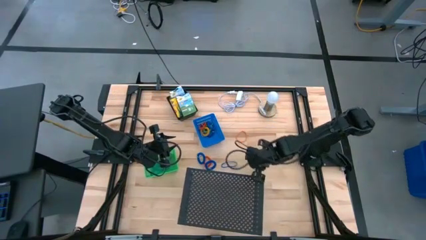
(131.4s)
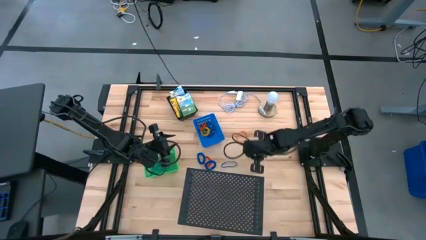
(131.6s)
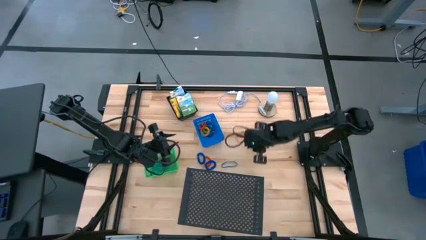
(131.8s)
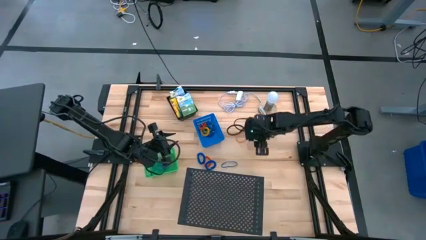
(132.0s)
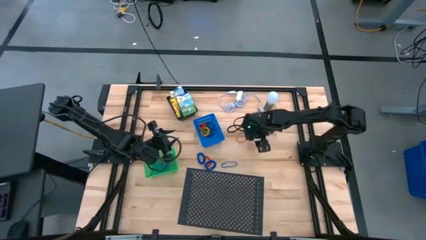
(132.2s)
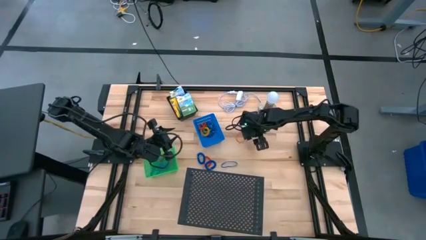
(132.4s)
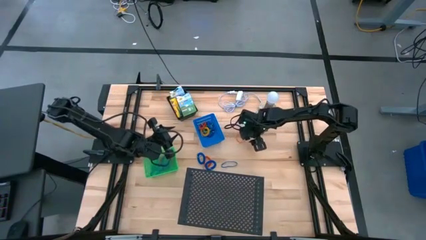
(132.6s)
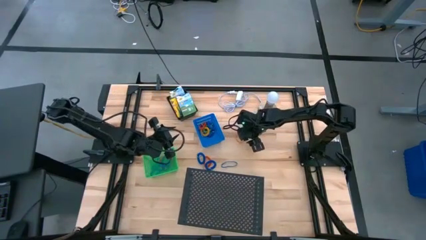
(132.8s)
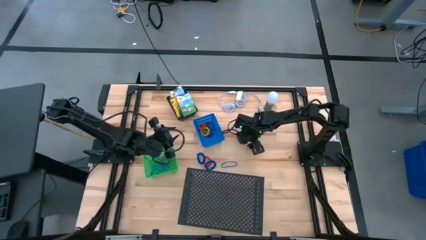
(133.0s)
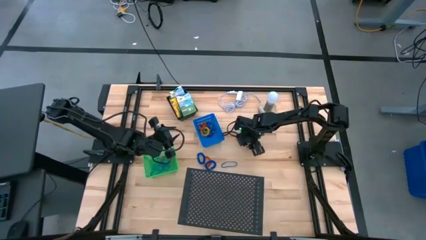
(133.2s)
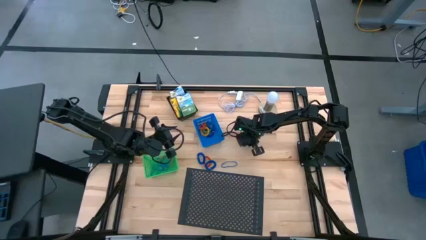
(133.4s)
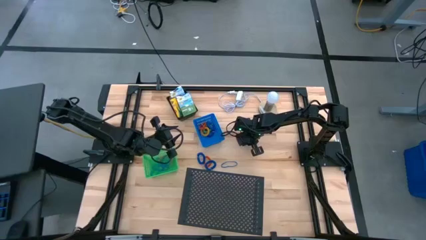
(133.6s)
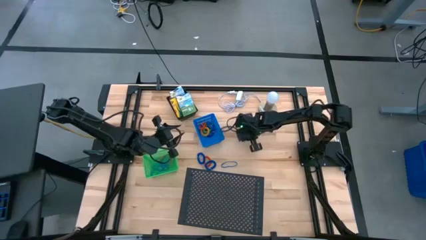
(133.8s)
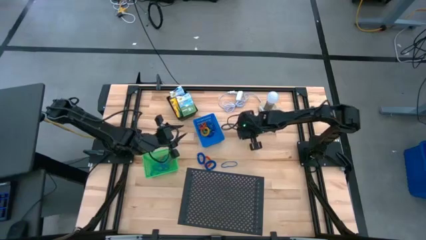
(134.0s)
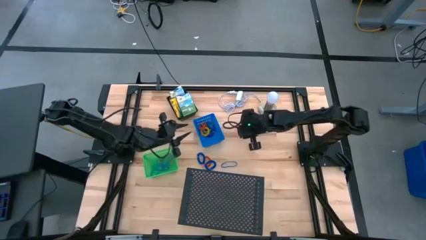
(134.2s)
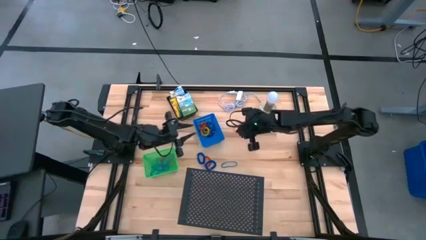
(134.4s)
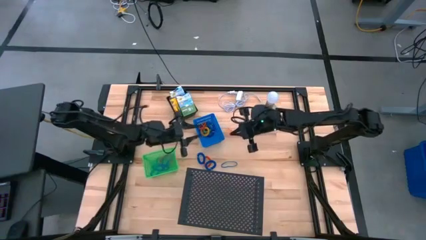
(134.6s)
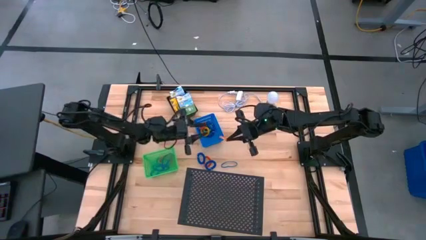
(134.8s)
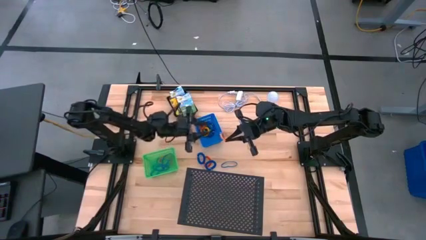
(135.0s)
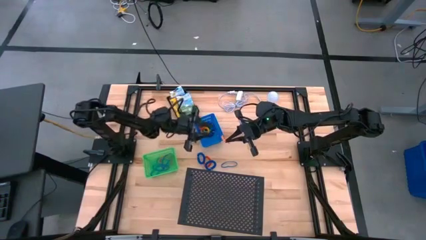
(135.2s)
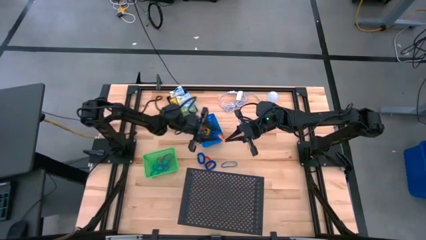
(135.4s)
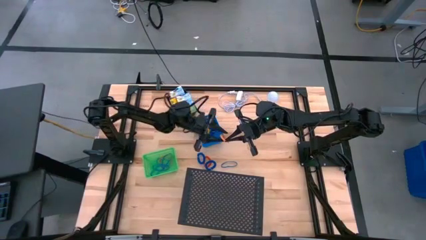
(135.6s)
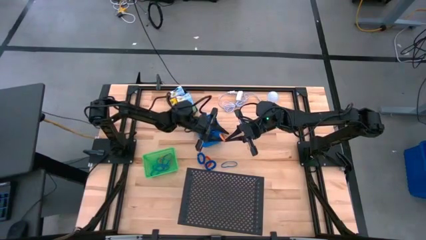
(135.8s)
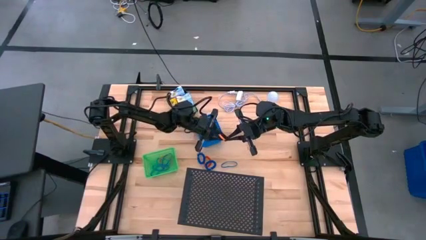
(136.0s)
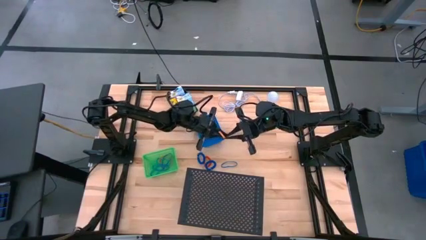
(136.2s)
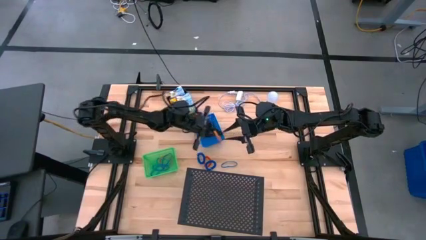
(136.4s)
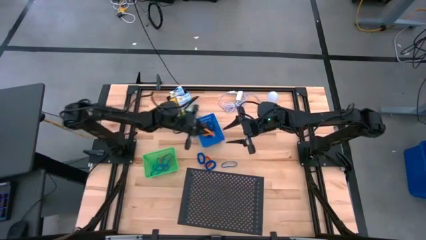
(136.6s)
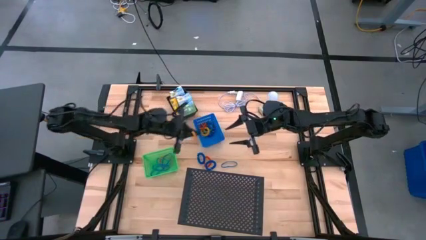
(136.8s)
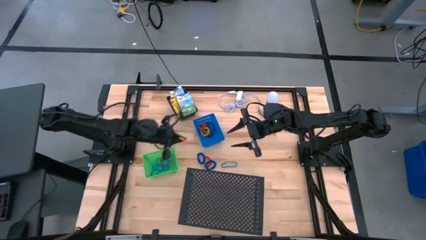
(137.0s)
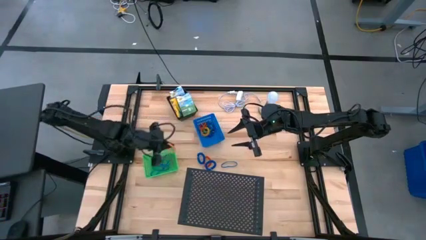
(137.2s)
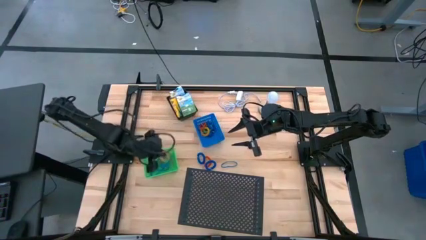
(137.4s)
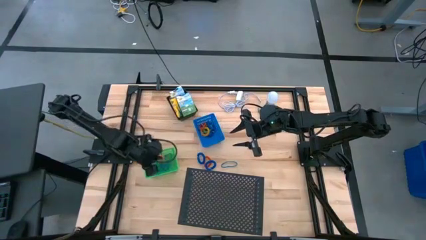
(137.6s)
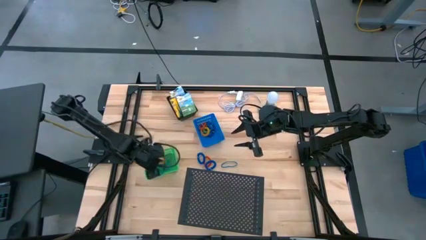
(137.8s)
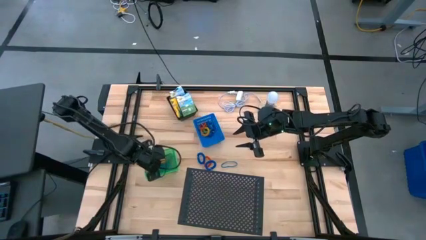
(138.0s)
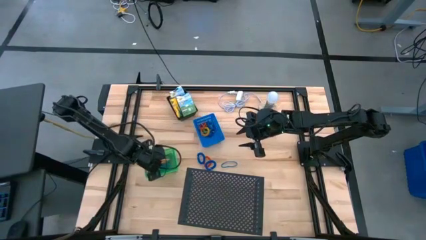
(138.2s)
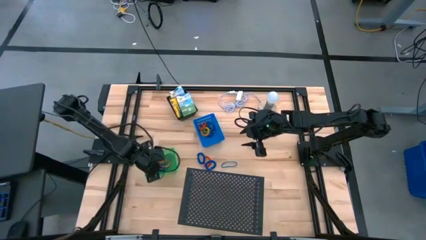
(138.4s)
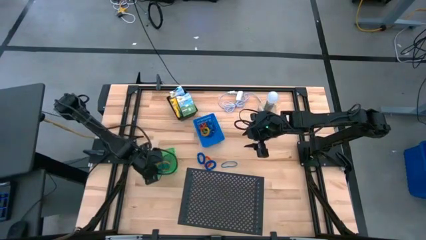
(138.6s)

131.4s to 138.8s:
Task: Pick & Place Office Desk Supplies
Put the yellow rubber band into the green bin

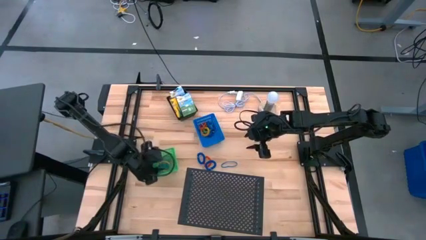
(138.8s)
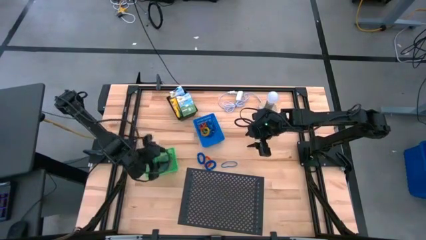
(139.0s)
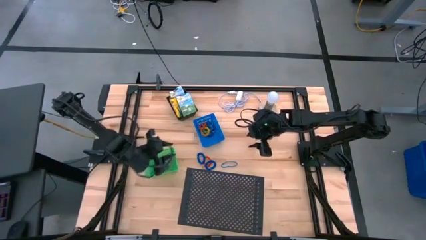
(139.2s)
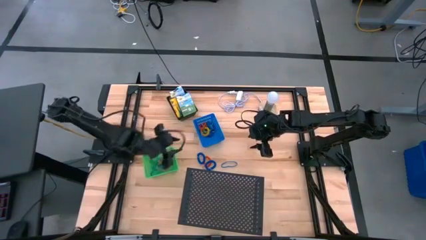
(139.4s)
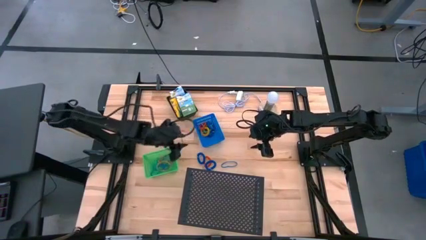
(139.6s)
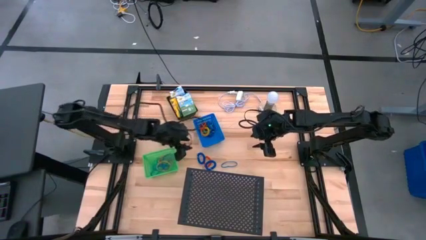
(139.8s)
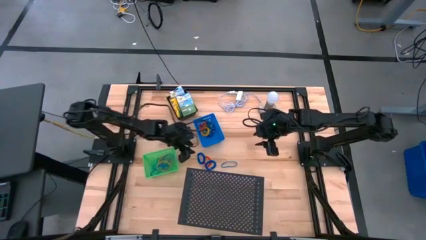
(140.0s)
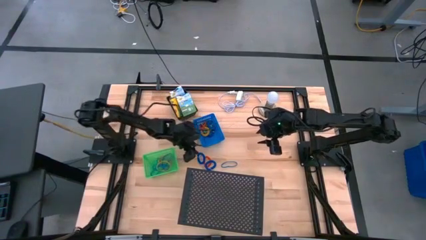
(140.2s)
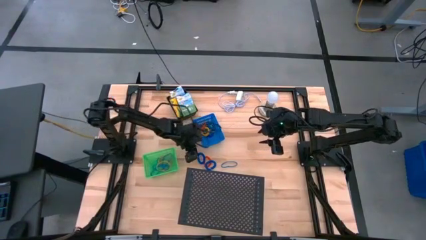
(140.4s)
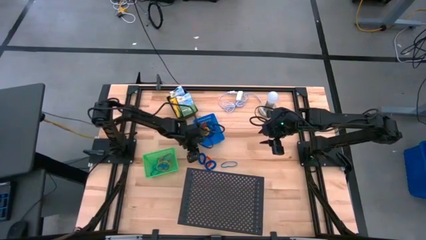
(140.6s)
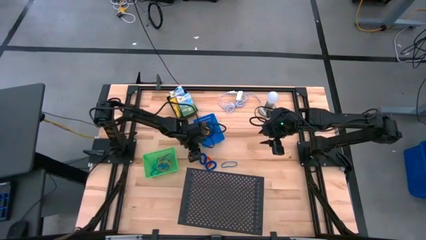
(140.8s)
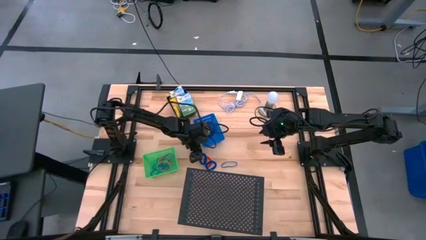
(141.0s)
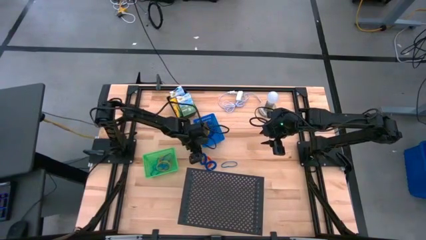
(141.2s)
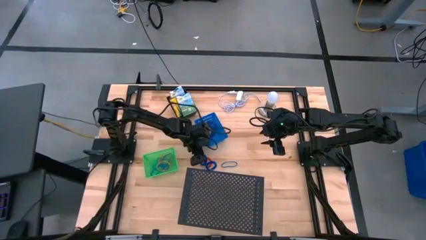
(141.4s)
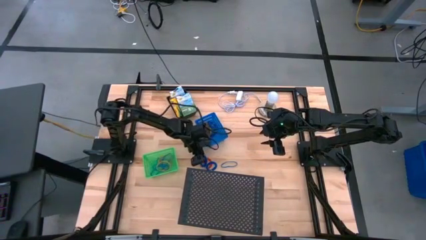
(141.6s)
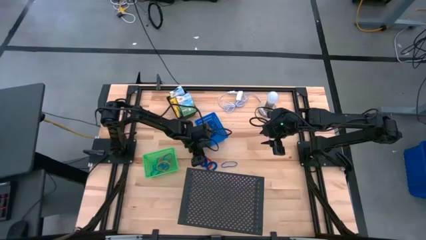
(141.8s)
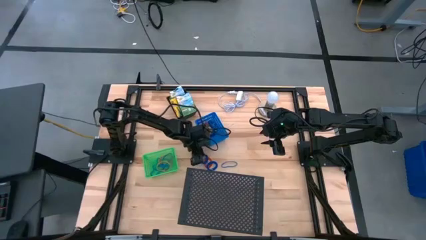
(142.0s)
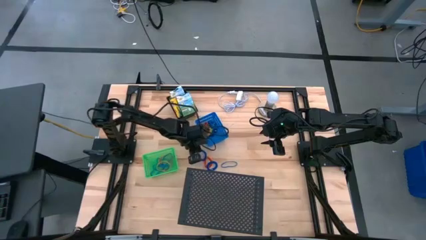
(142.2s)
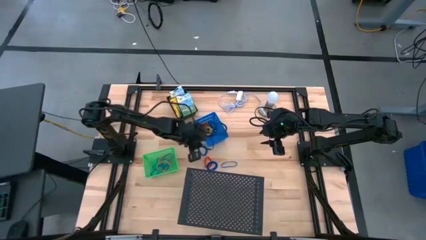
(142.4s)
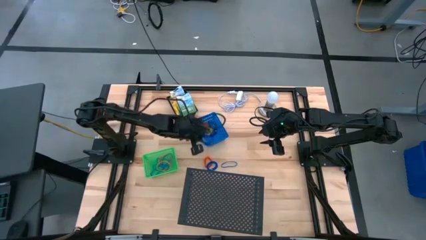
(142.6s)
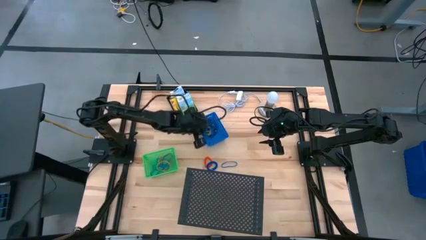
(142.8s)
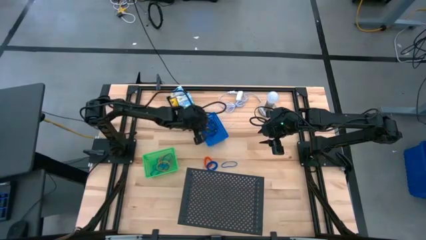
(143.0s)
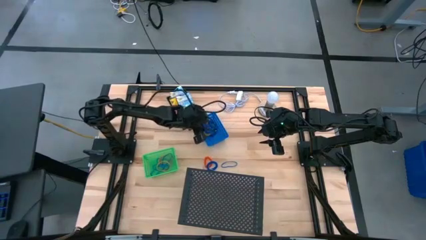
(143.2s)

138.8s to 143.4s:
Put the left blue key band into the blue bin

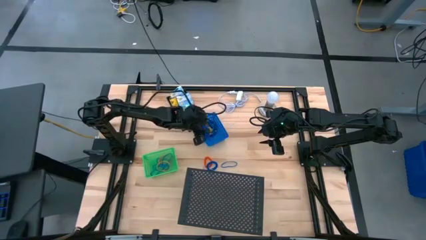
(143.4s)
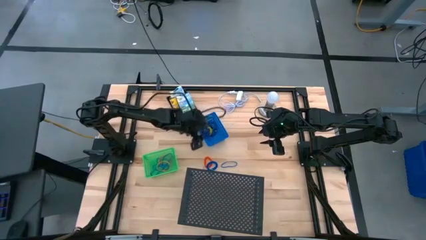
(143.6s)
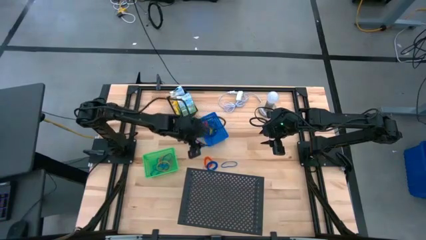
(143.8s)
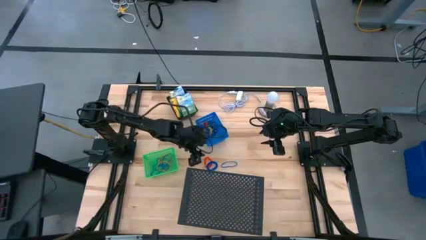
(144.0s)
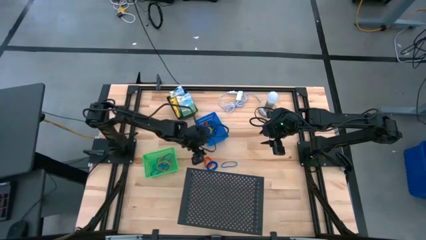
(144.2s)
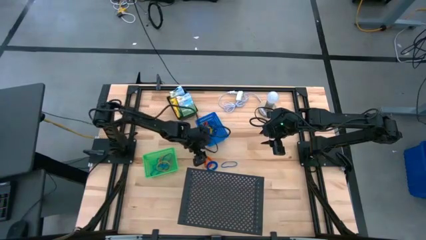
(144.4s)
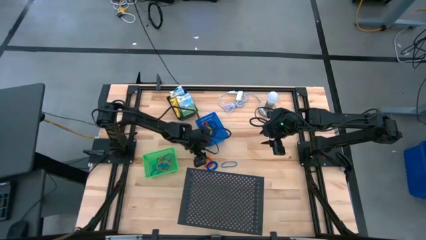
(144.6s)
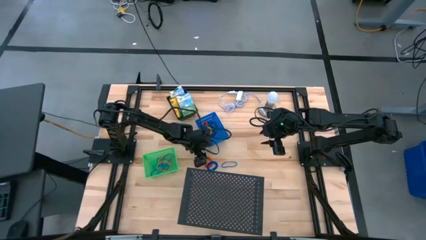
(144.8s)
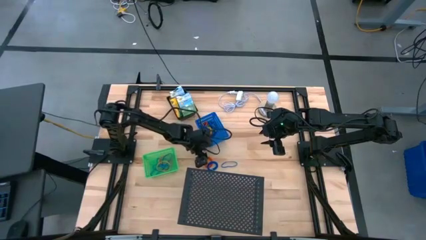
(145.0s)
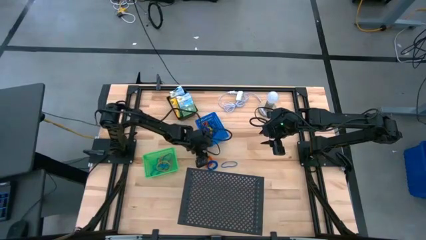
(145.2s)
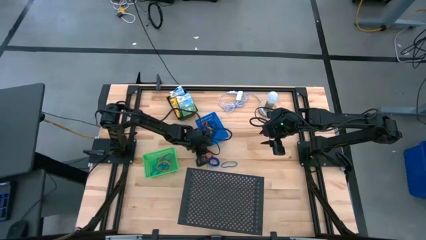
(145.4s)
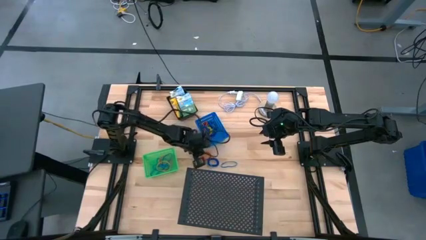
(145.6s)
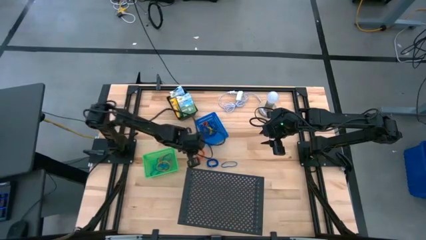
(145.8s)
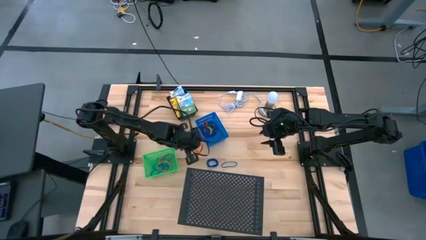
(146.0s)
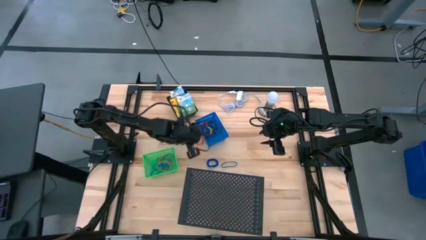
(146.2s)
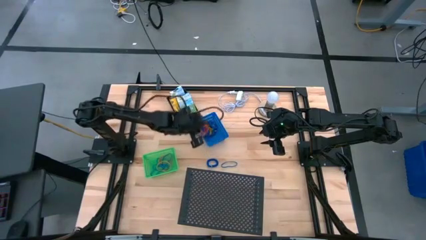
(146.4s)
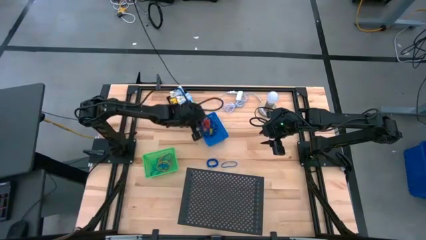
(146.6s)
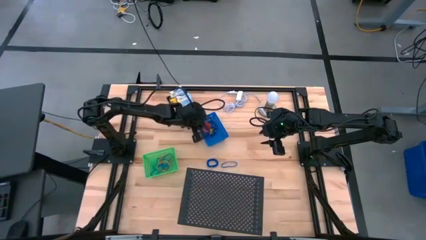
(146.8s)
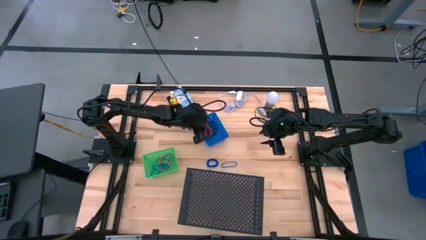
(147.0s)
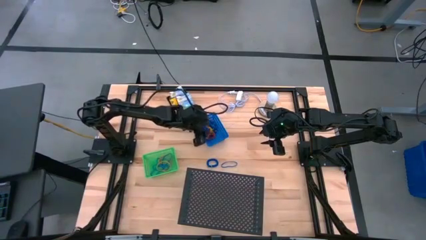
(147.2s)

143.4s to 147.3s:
Put the orange key band into the blue bin
